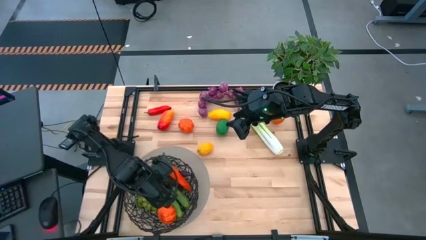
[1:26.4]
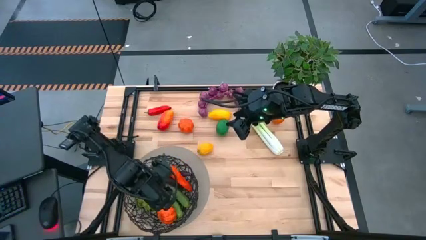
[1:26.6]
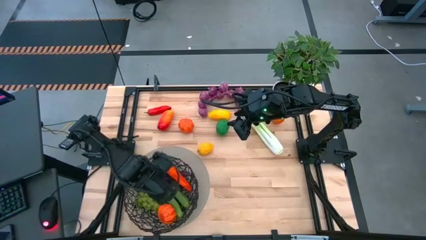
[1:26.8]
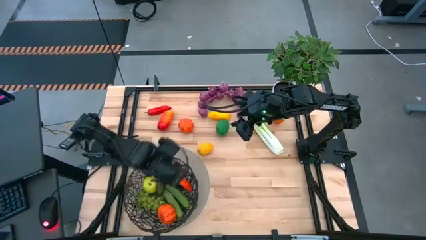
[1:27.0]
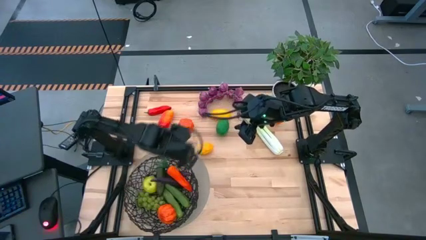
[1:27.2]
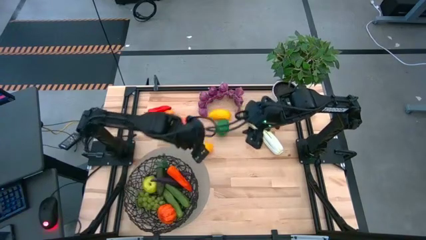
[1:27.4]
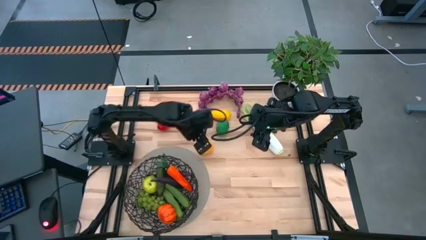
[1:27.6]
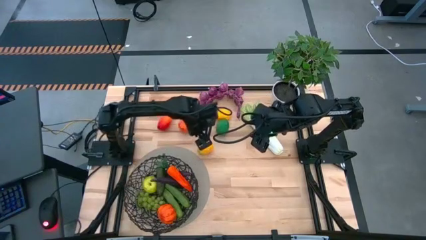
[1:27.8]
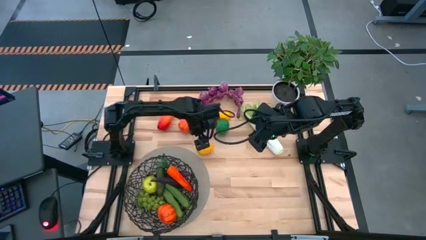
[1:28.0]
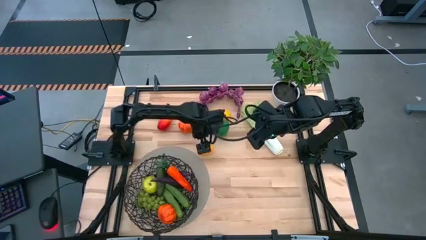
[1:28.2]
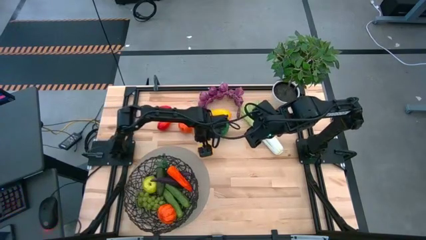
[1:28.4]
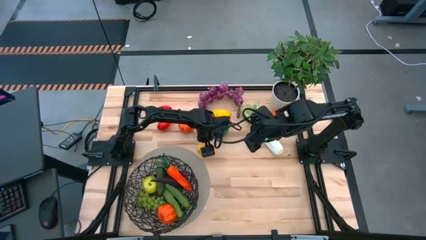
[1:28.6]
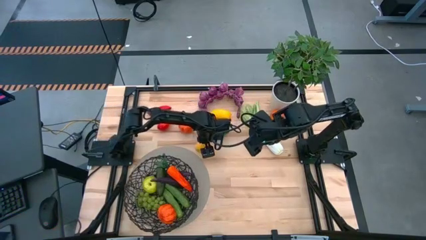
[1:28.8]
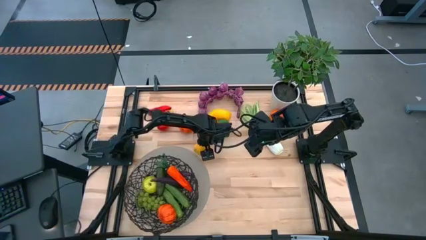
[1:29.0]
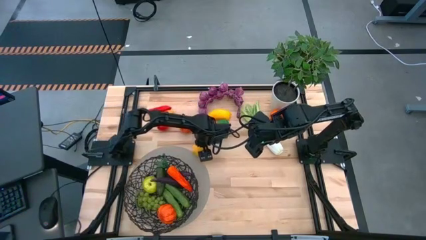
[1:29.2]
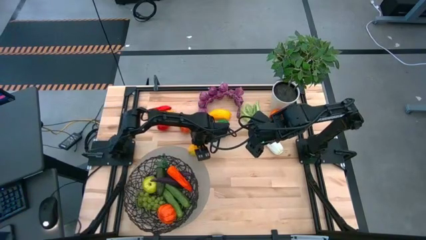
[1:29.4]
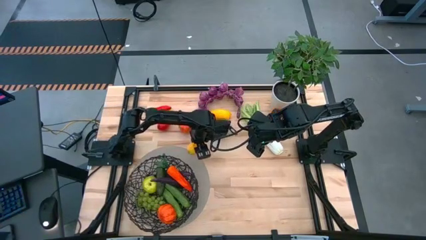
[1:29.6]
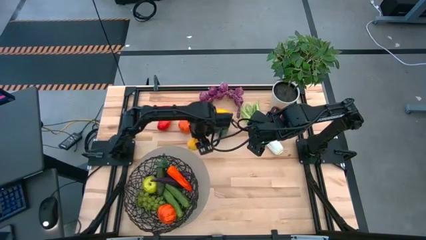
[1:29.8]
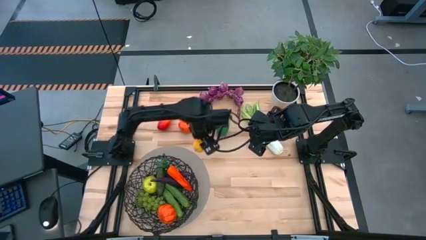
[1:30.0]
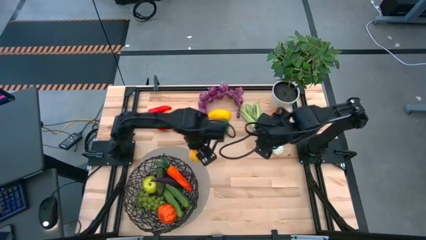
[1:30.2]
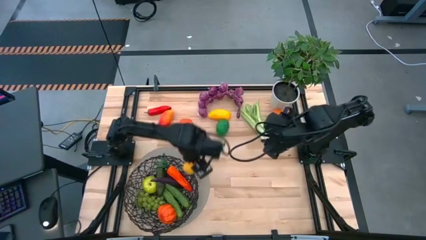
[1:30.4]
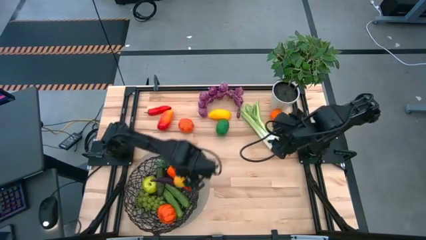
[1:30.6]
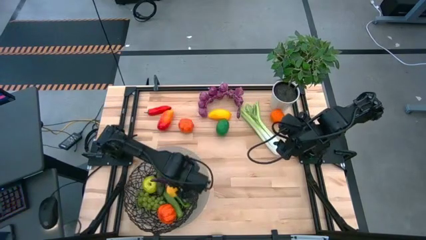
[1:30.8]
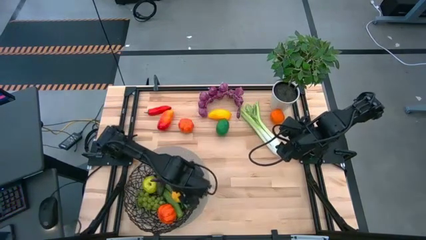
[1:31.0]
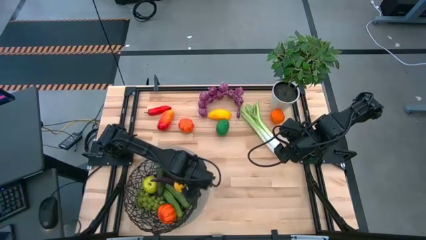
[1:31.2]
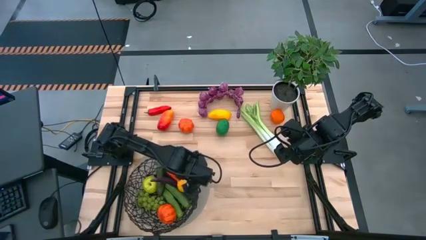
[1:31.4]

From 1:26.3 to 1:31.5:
Task: Build produce basket
Put the yellow lemon into the black basket

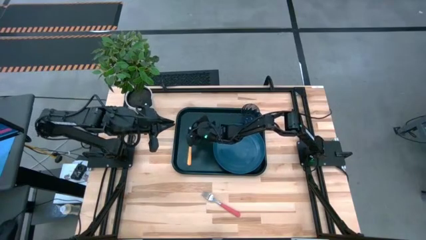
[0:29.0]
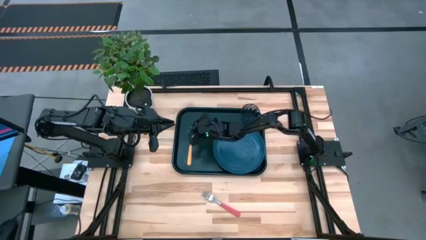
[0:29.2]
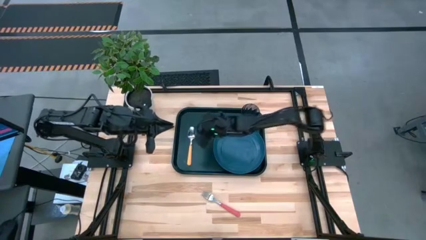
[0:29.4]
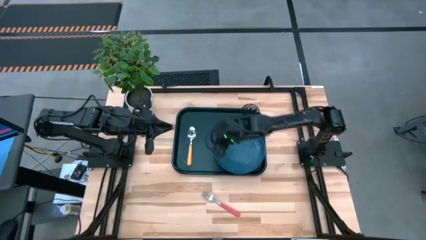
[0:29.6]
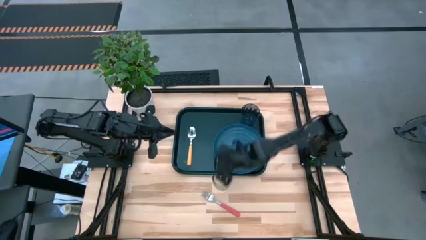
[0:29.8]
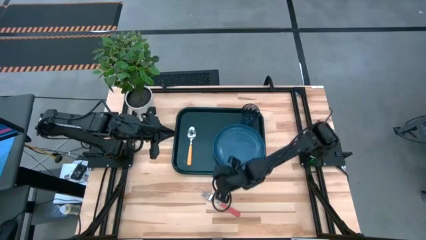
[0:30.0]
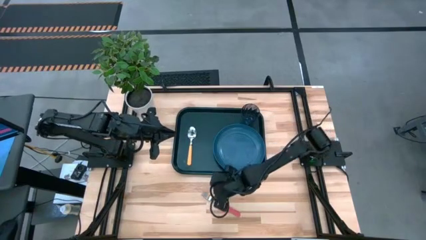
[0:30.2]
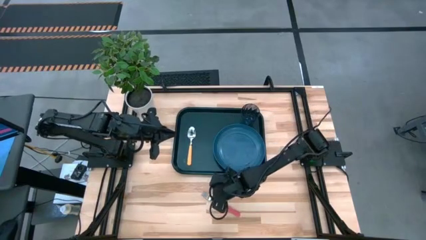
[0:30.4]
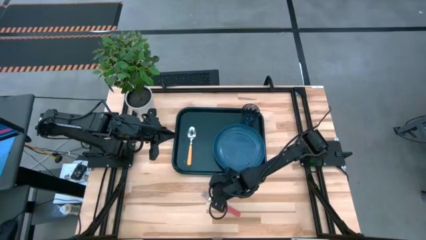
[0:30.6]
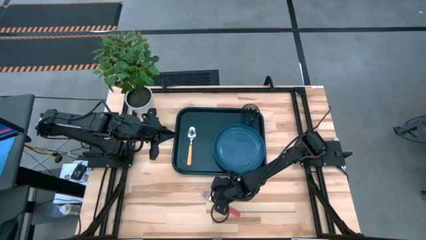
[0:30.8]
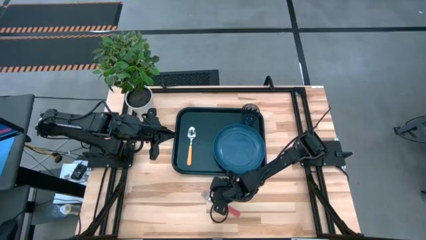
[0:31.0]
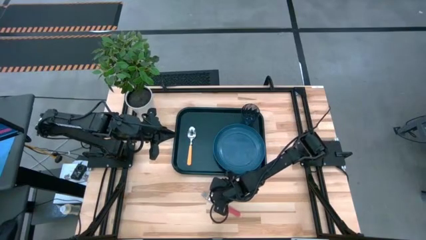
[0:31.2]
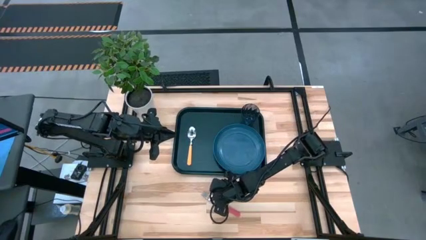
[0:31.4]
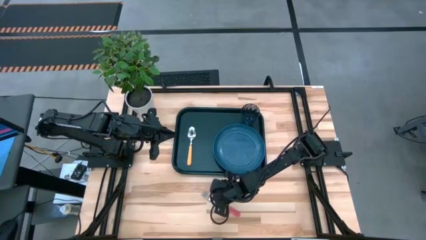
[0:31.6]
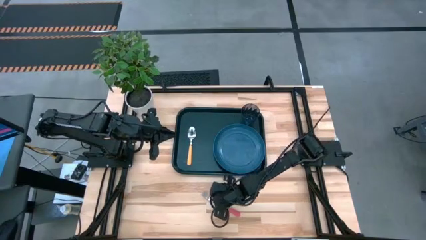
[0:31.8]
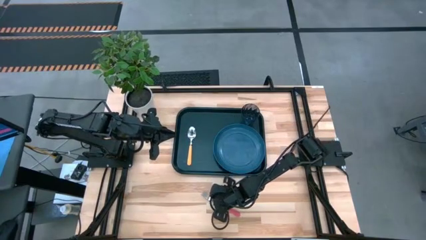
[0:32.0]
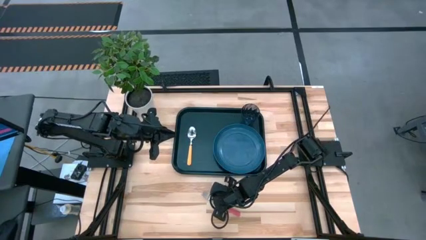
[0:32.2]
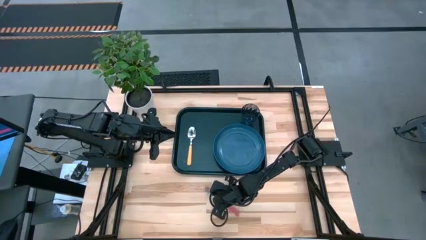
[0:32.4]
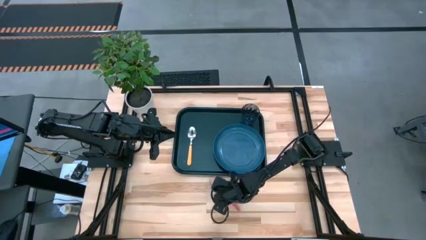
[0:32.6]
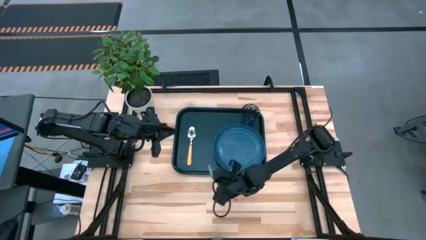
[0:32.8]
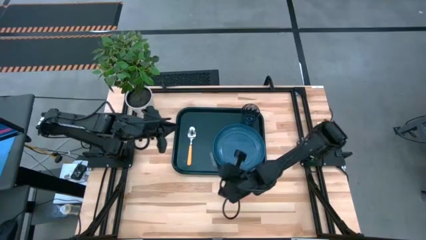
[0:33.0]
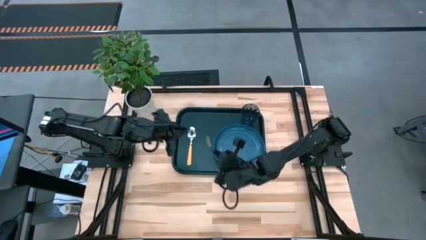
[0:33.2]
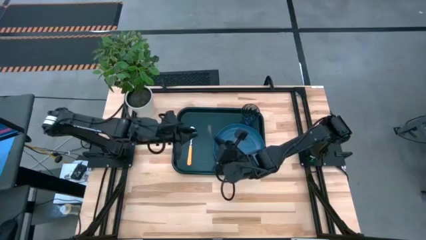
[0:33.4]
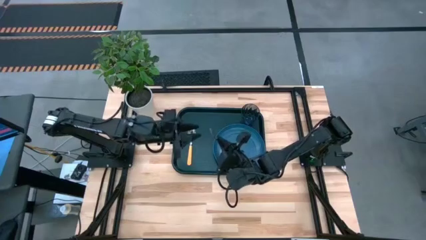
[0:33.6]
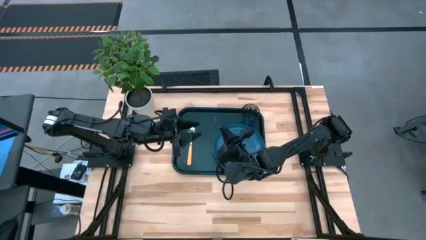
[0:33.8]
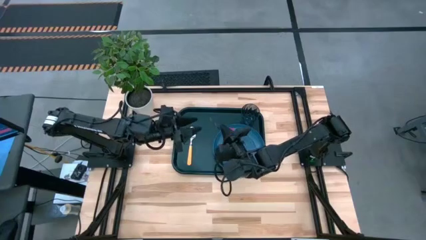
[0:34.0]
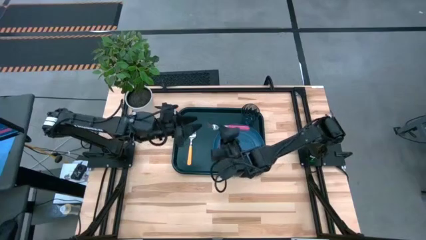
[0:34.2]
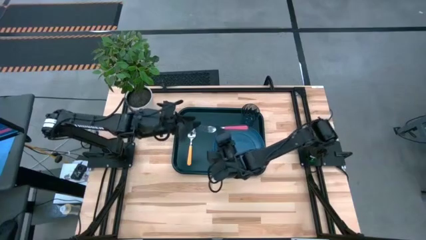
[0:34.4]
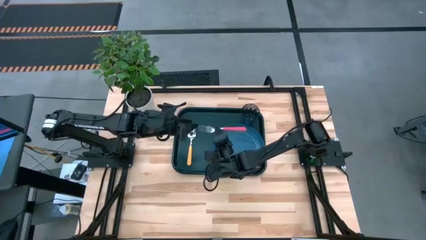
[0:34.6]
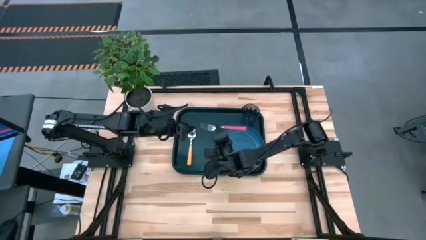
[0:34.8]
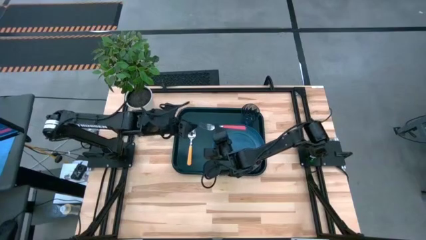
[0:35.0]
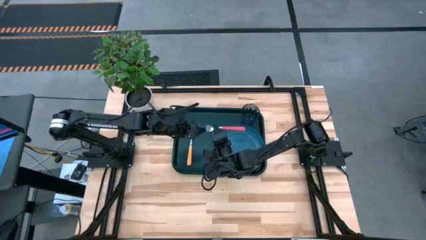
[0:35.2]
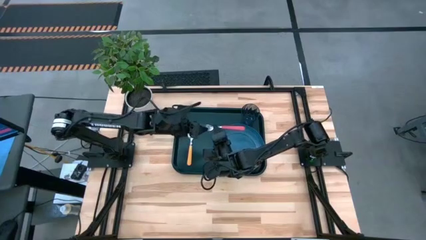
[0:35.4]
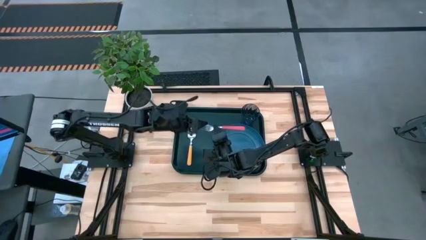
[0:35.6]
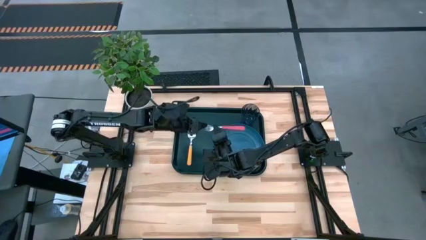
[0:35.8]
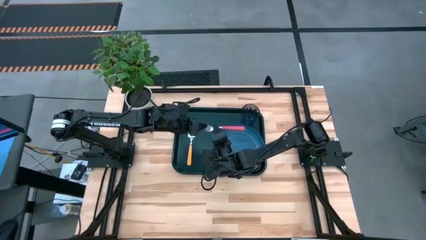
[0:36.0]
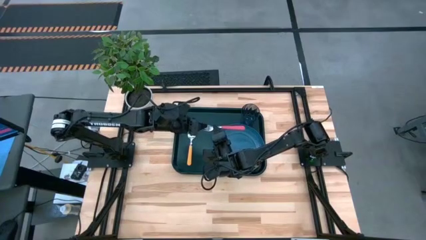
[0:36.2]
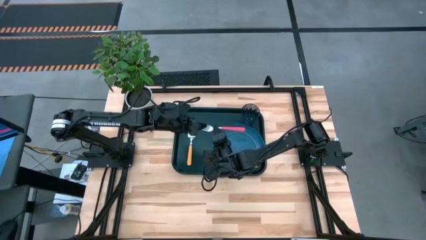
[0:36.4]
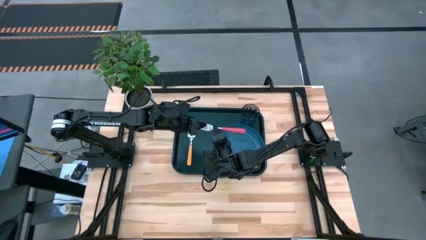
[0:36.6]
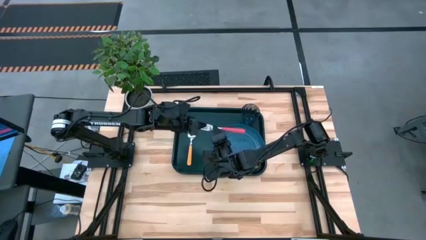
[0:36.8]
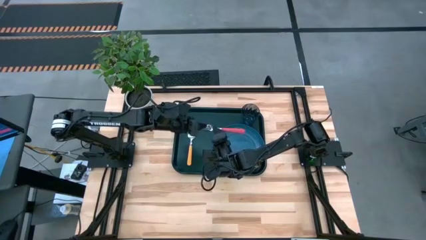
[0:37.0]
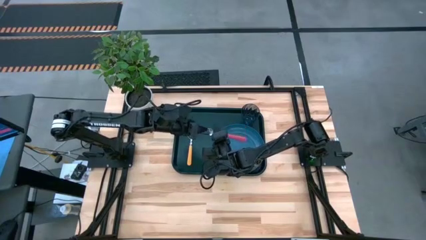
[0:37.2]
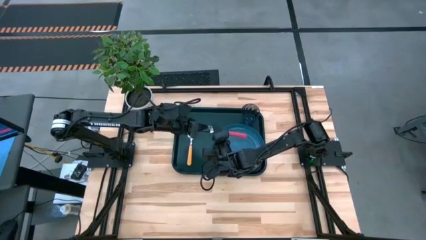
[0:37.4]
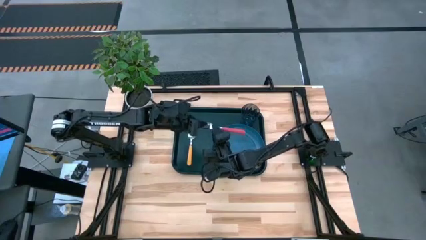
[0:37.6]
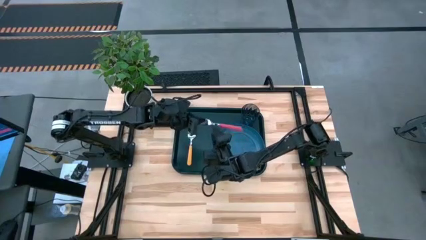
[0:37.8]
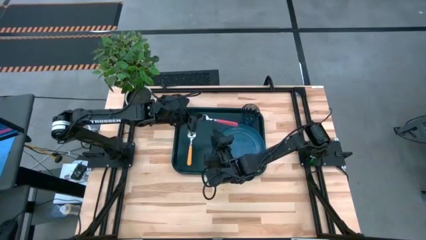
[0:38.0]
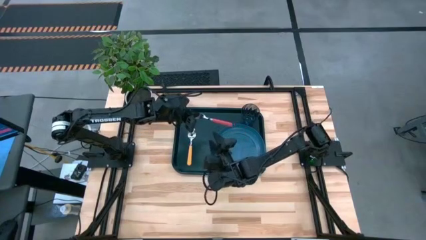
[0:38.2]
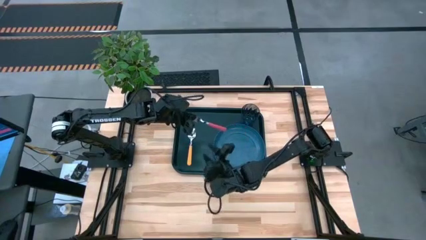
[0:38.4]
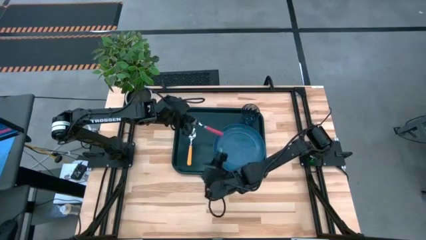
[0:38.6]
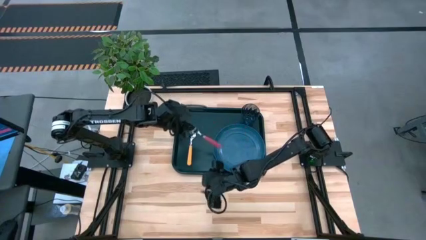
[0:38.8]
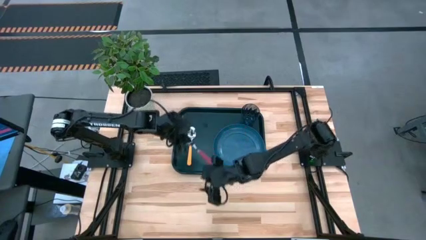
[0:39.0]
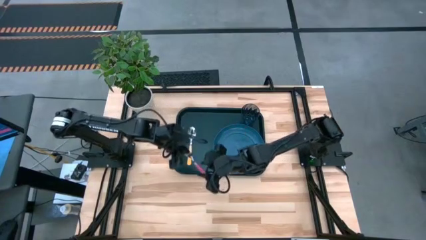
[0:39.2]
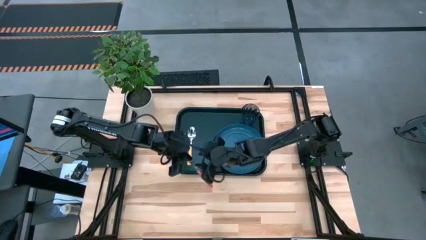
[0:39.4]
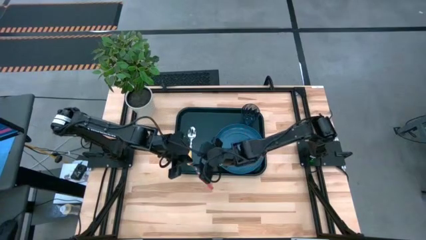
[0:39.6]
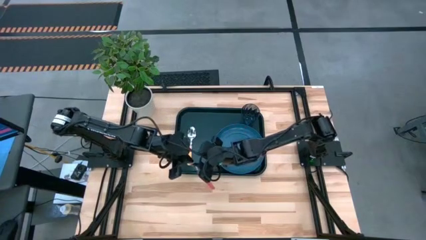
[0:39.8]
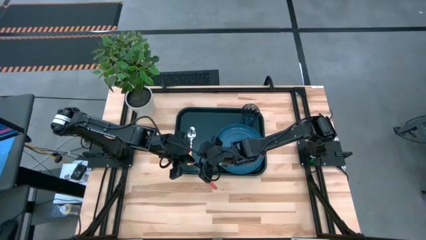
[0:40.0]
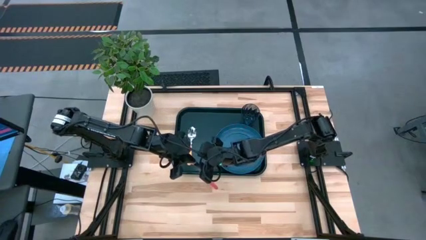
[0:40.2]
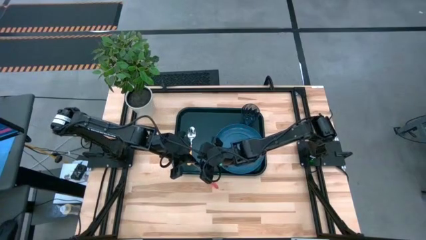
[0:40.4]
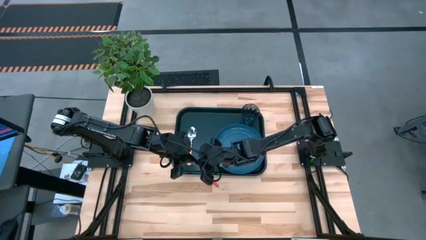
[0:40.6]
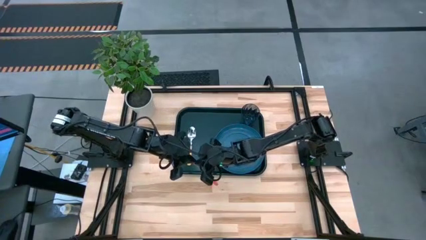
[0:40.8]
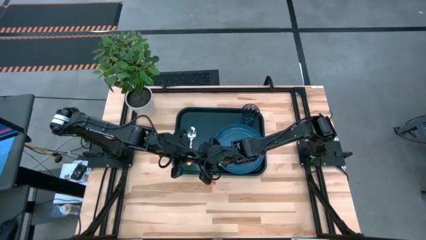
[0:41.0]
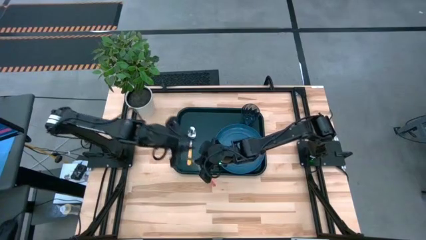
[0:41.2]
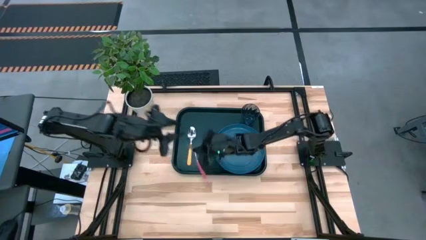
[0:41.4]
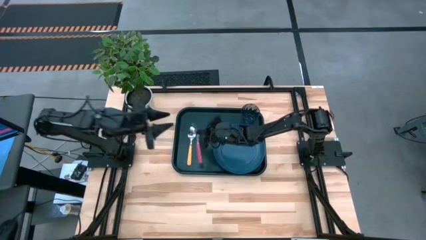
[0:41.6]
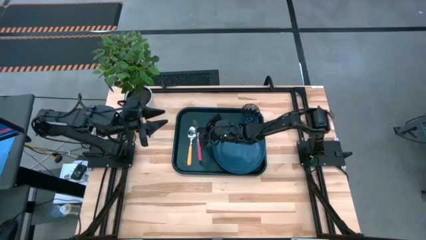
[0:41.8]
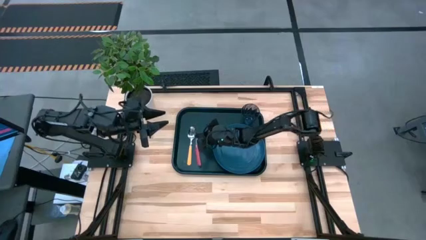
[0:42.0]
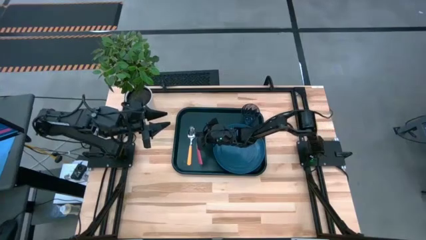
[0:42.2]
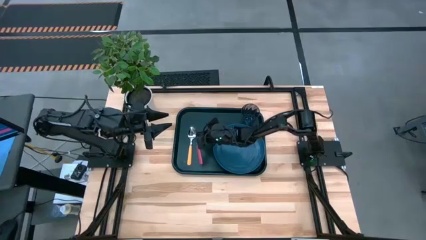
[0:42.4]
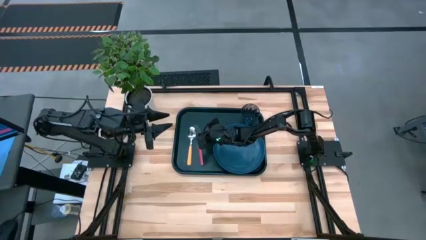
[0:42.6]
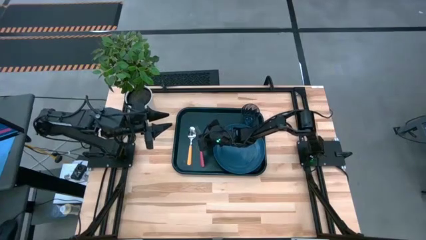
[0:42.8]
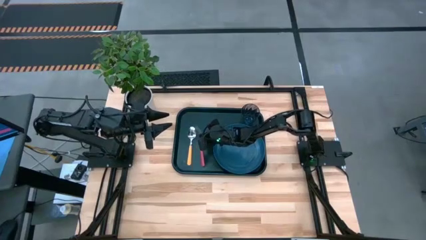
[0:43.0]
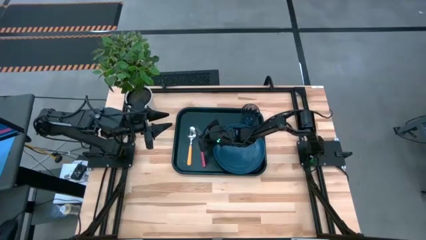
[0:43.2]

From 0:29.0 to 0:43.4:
Task: Pick and place plate/cup/fork/spoon on tray
Put the red fork on the black tray to the left of the blue plate
